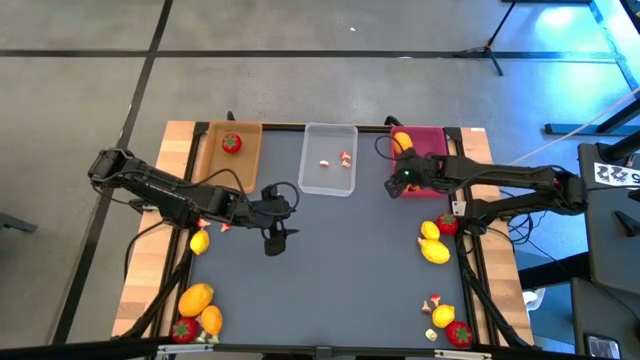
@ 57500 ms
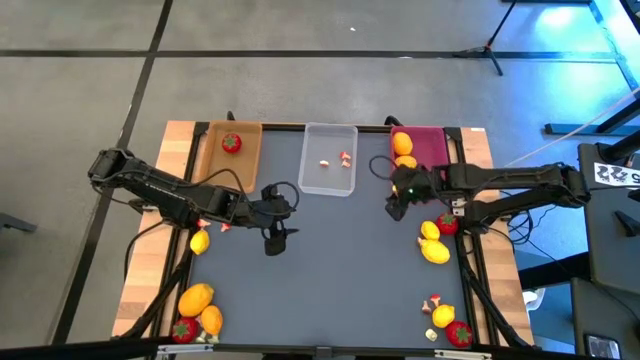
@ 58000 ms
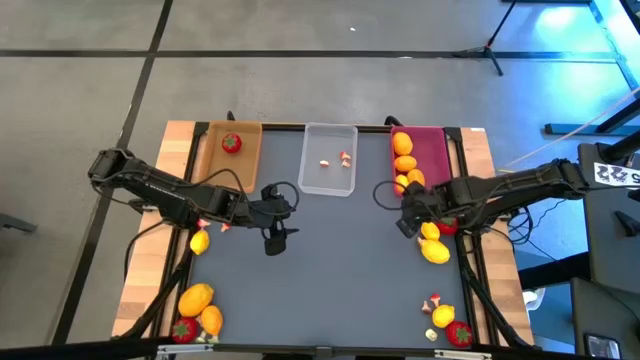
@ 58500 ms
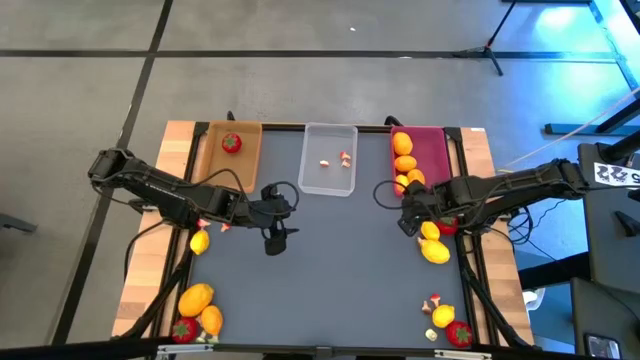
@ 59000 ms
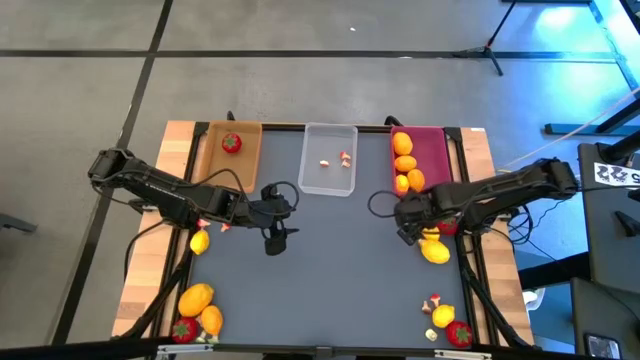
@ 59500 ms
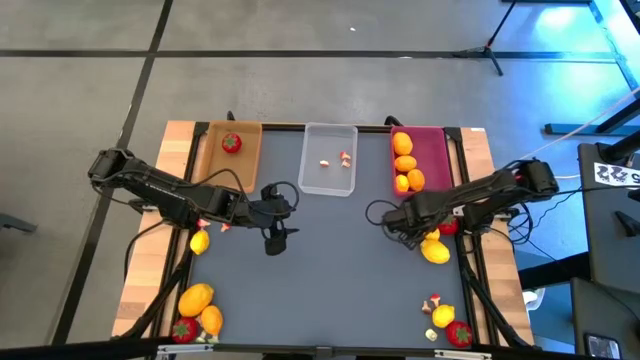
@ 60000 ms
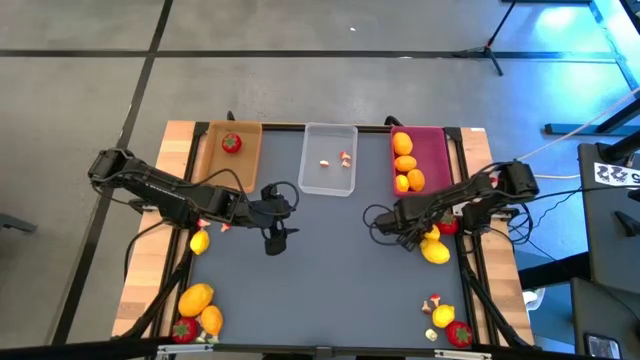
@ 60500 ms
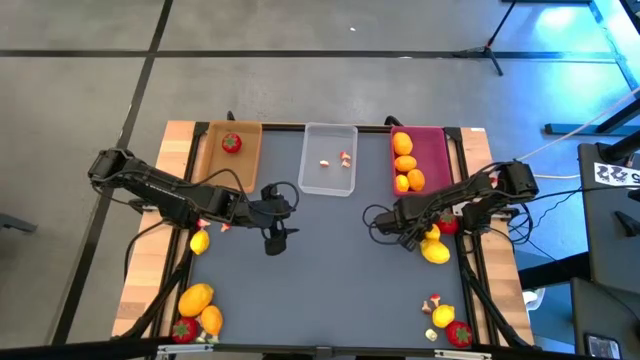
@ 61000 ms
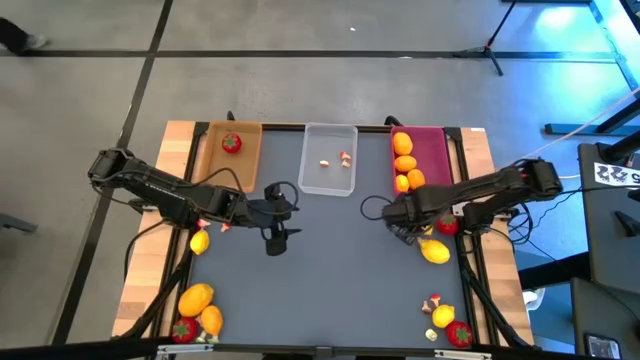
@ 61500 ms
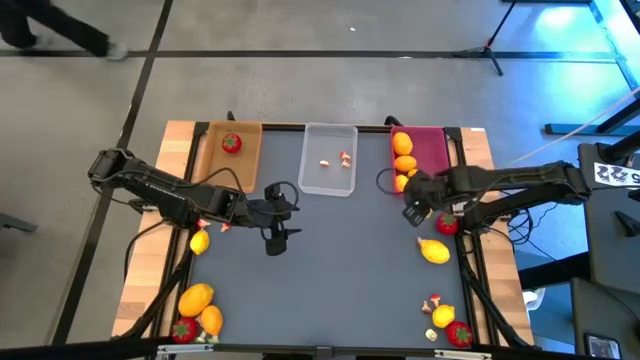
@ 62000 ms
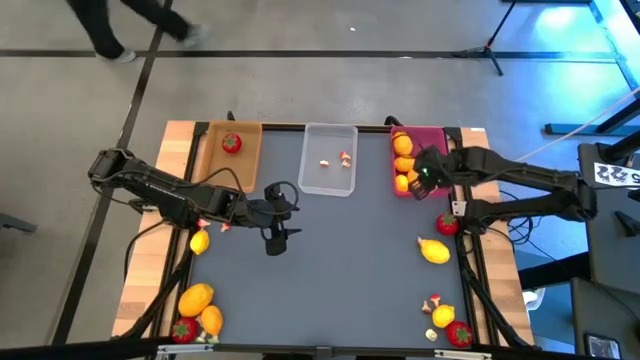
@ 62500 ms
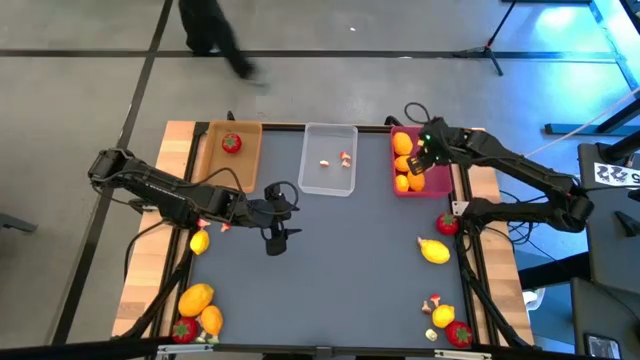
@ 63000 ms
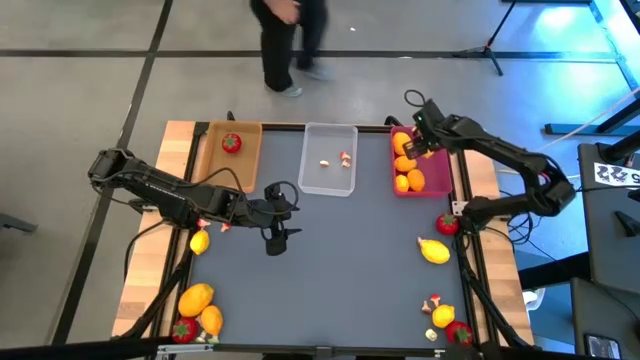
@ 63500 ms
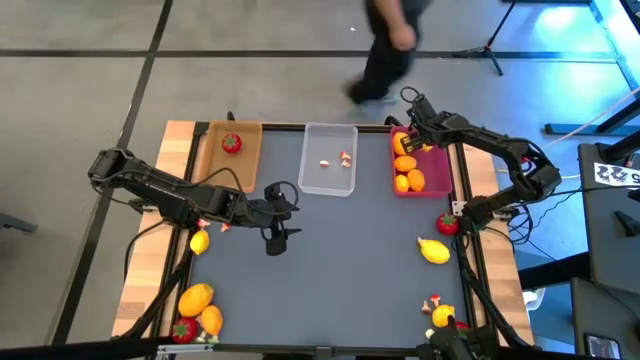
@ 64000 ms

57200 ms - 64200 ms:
Task: Sort produce into baskets
Put the lemon into the pink bin

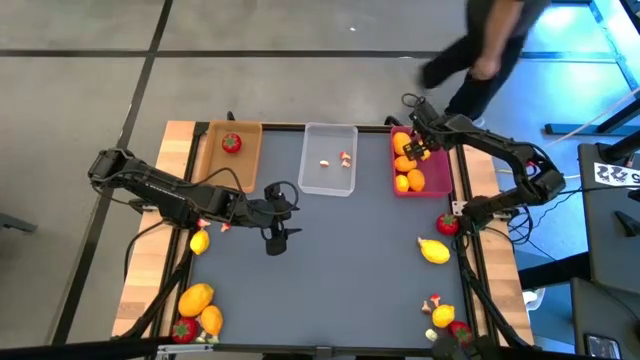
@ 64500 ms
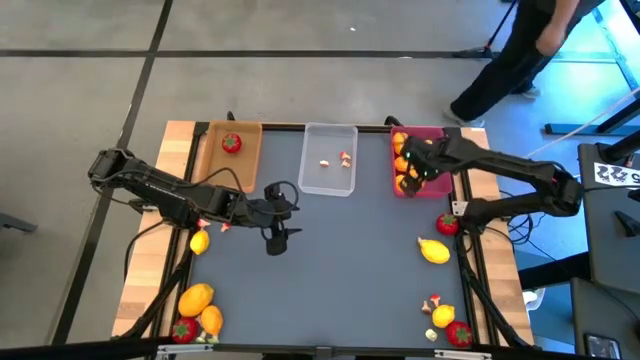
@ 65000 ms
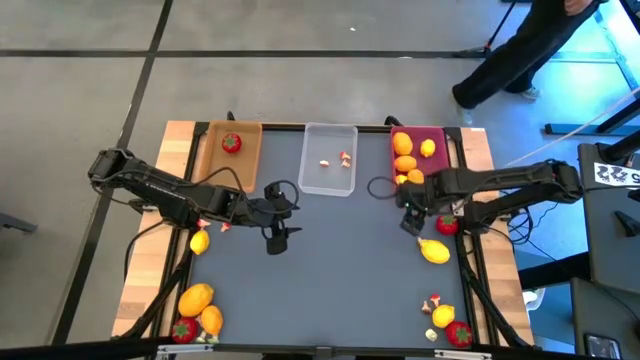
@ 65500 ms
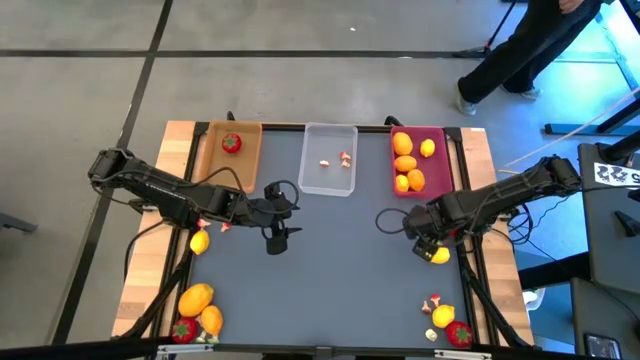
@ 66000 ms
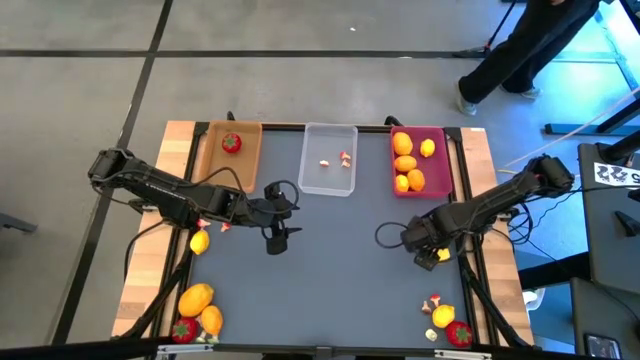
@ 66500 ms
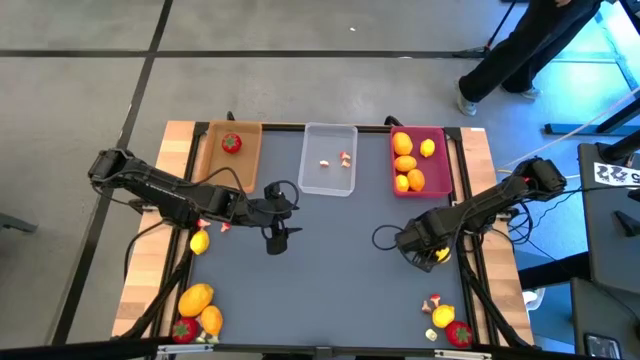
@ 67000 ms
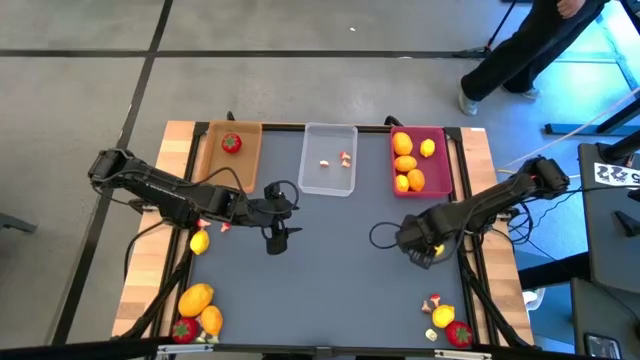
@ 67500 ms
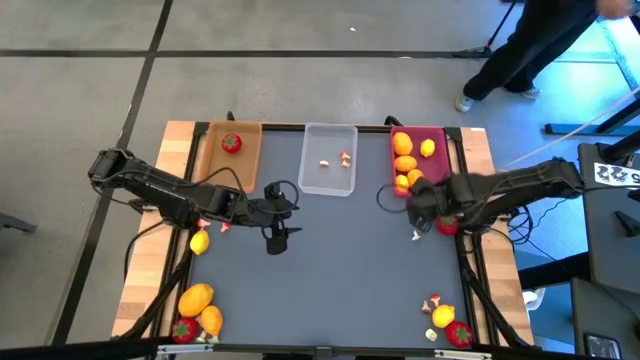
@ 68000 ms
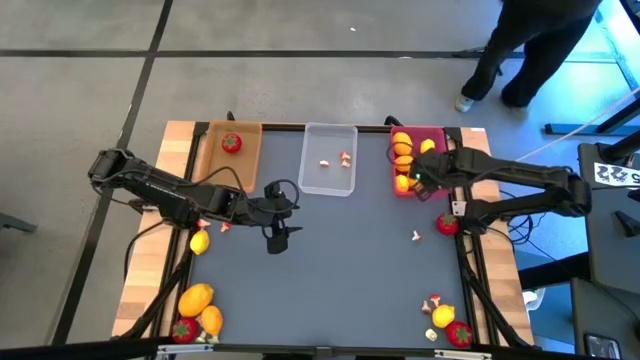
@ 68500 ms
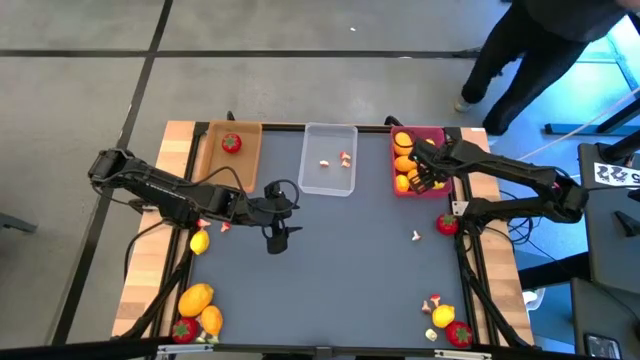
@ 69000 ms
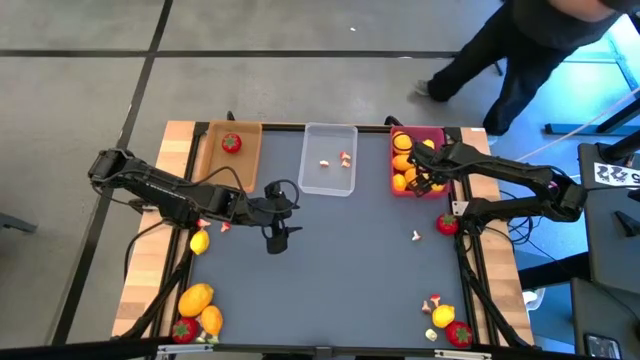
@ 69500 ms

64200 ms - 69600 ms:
Put the lemon into the pink bin

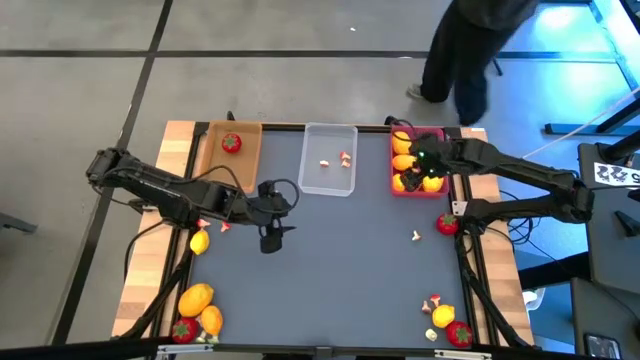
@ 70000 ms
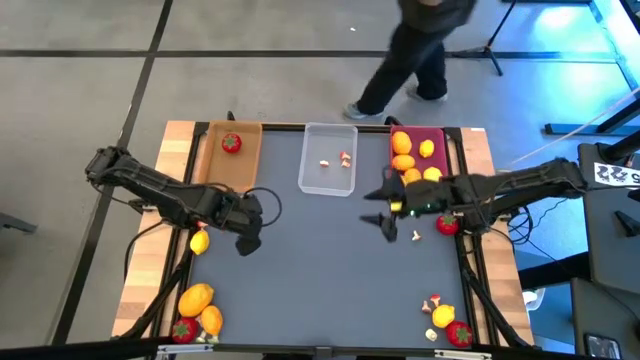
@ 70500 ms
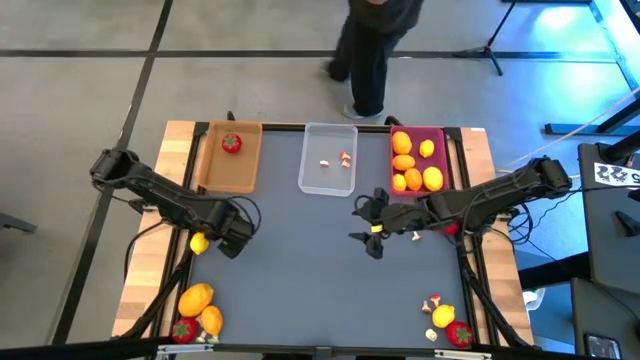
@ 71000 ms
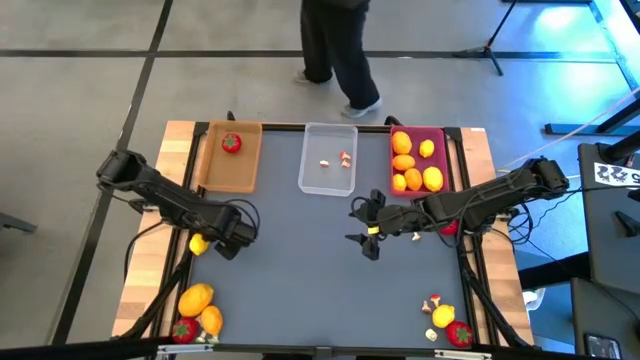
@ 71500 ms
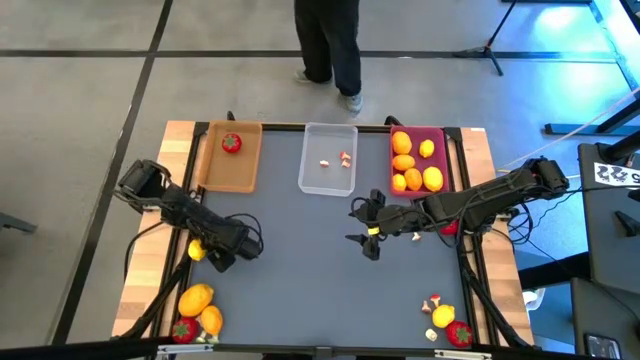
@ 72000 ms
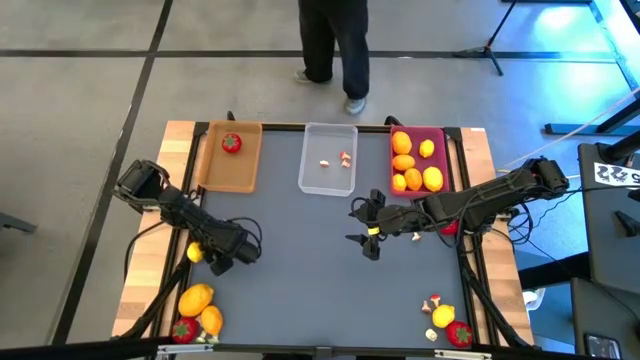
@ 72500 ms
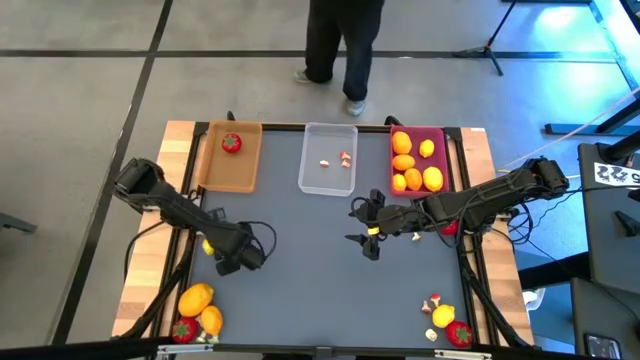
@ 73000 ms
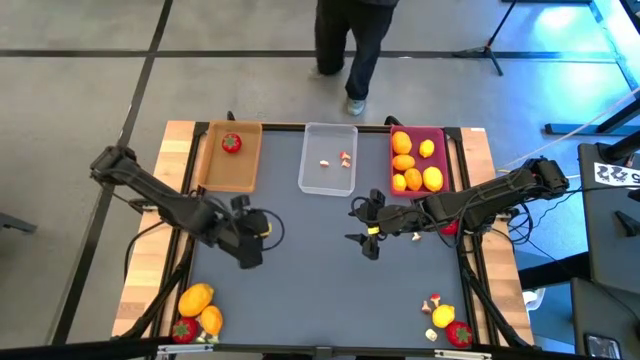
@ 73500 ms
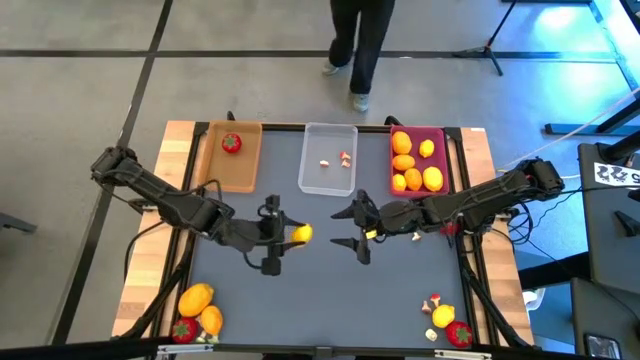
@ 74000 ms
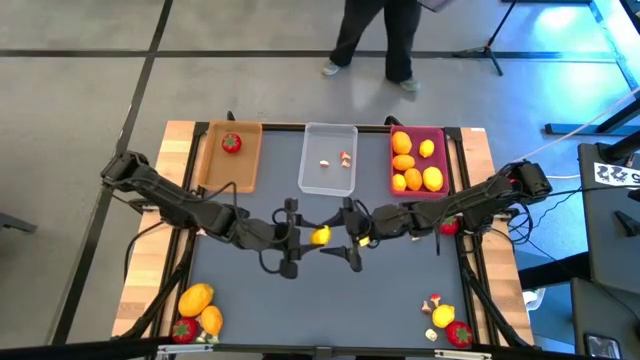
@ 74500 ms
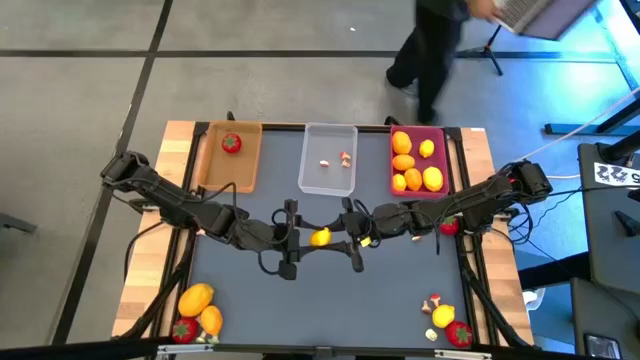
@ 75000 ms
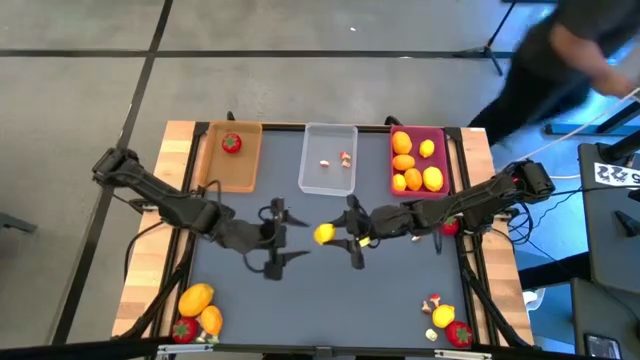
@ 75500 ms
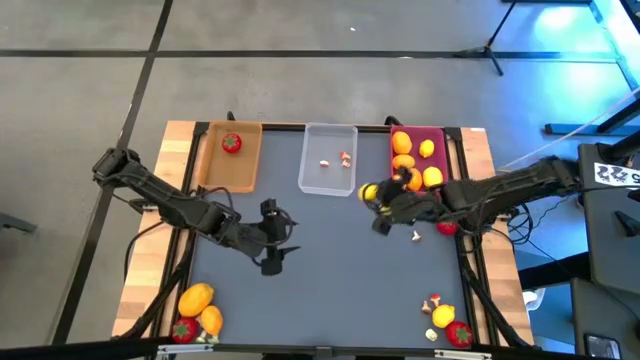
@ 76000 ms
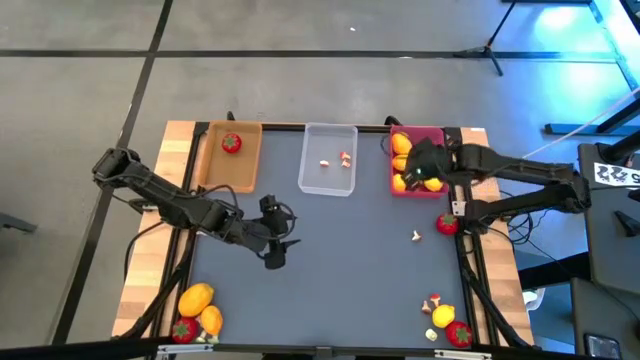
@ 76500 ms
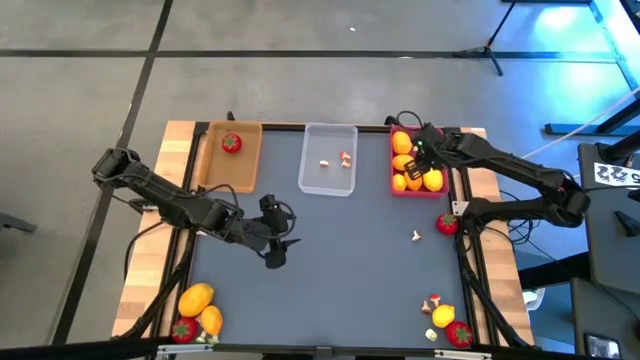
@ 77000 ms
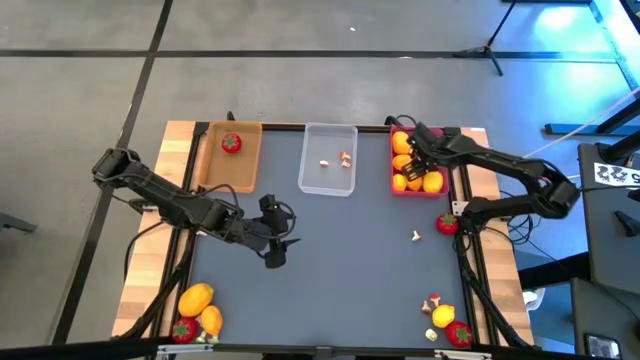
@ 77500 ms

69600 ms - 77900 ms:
Put the lemon into the pink bin
